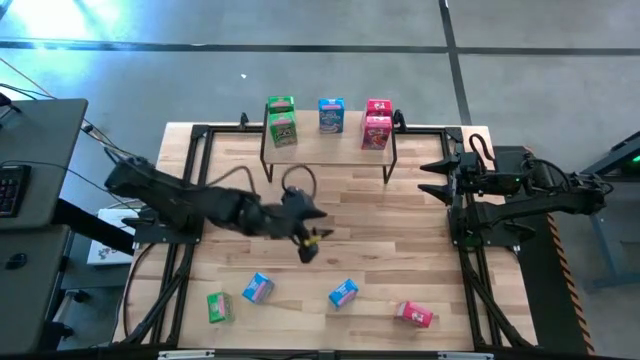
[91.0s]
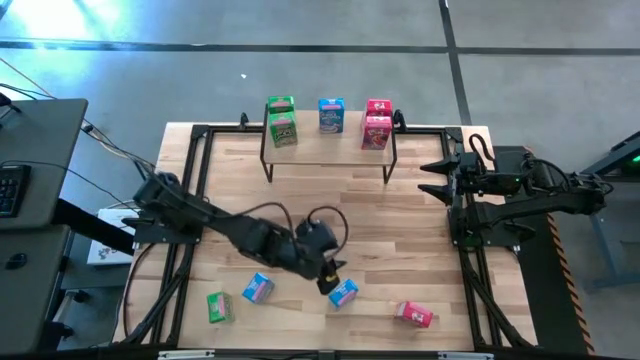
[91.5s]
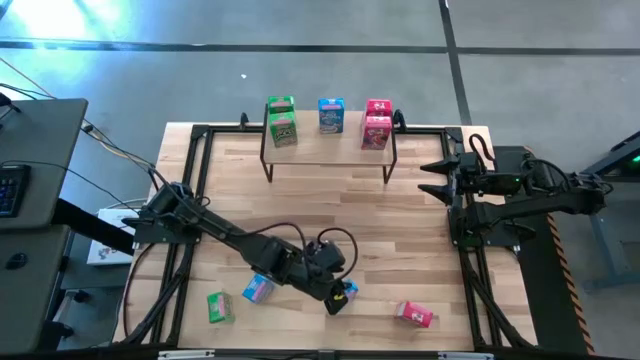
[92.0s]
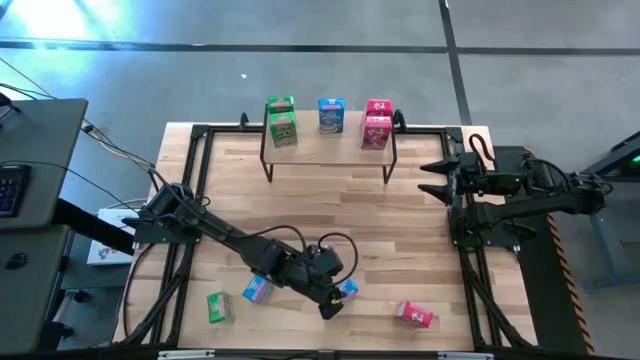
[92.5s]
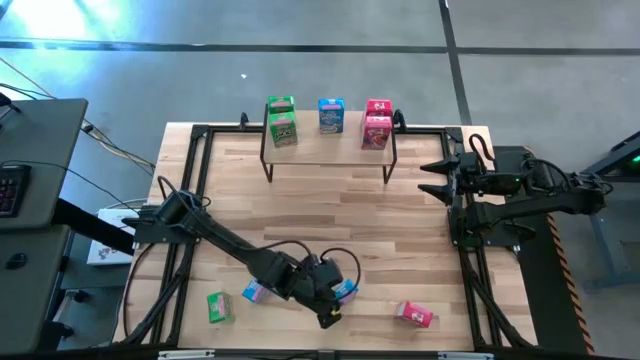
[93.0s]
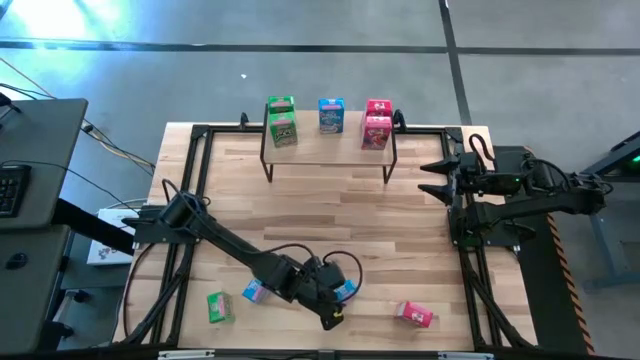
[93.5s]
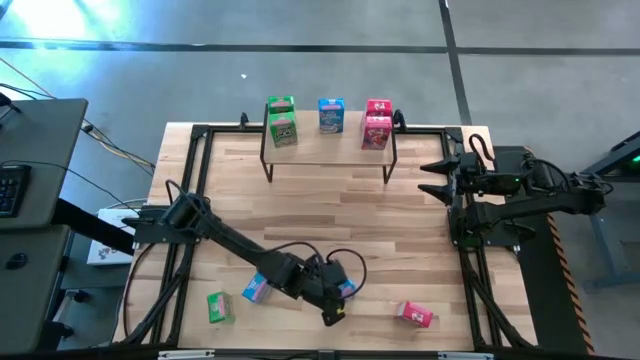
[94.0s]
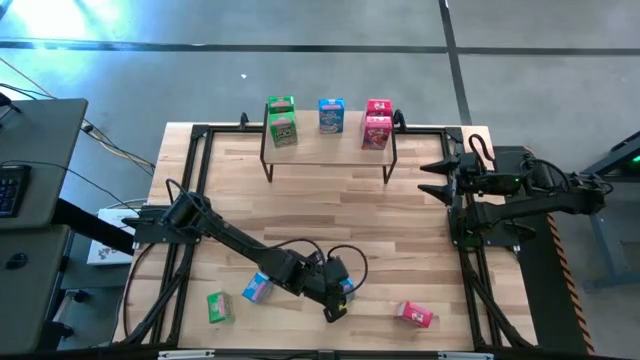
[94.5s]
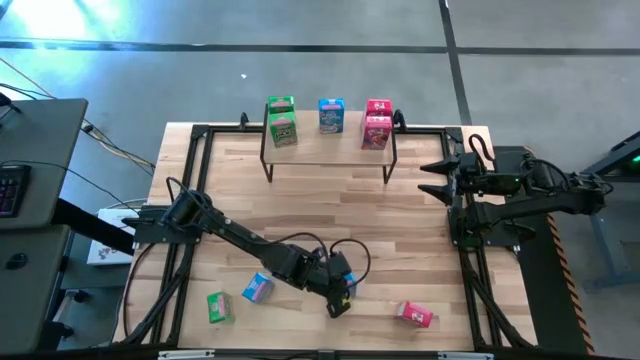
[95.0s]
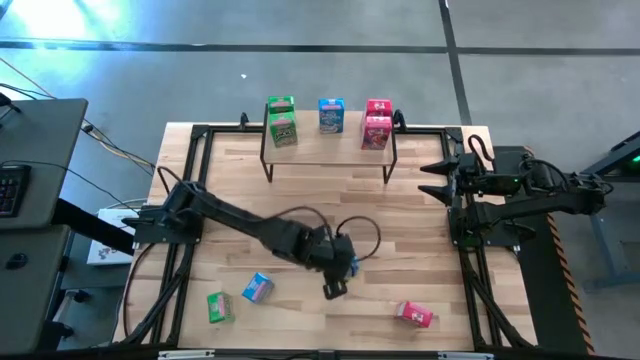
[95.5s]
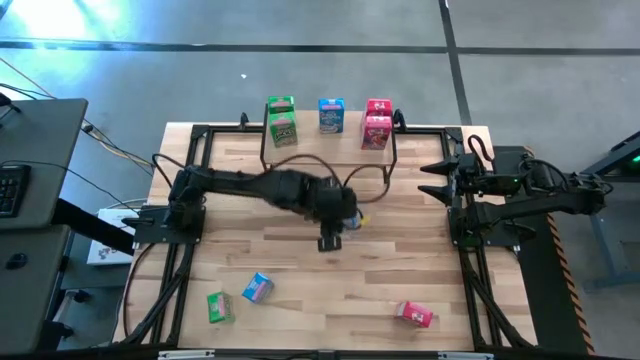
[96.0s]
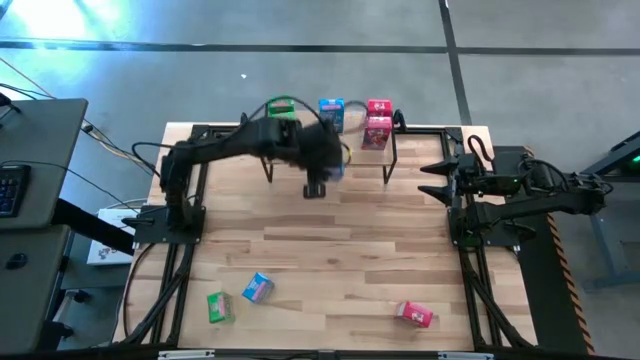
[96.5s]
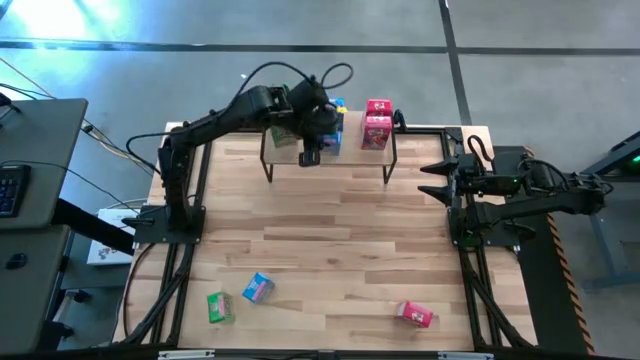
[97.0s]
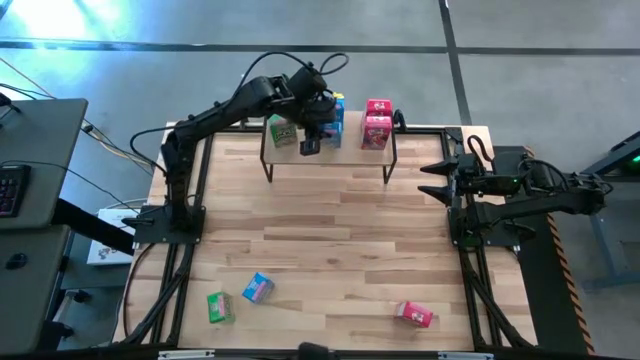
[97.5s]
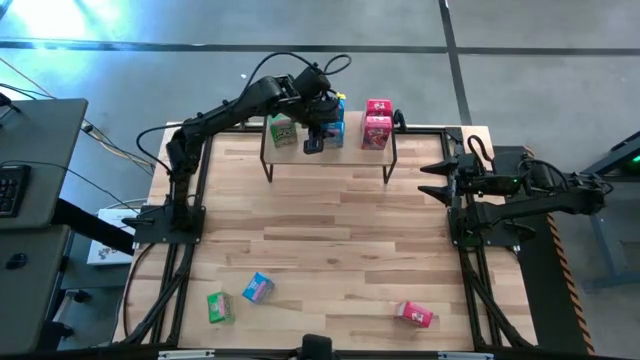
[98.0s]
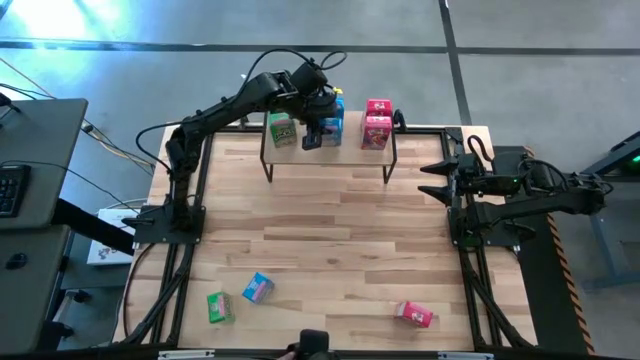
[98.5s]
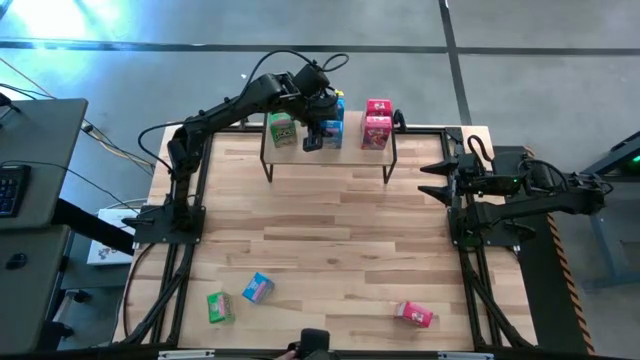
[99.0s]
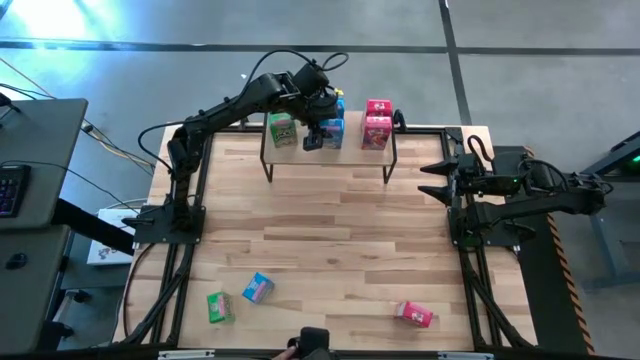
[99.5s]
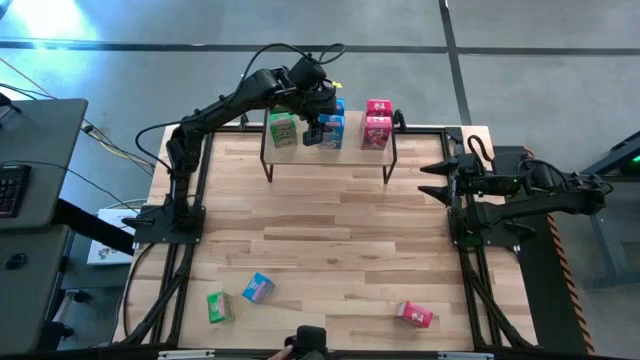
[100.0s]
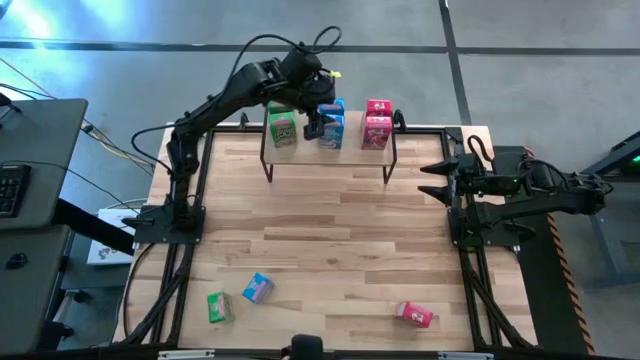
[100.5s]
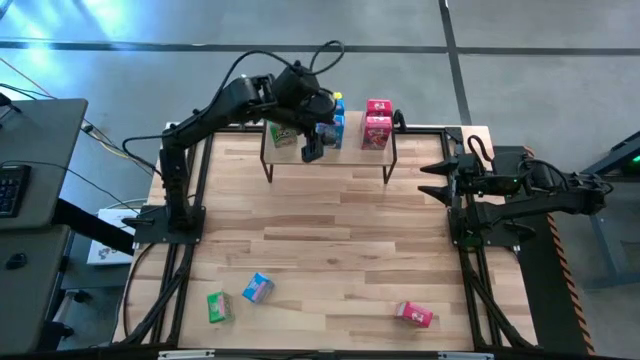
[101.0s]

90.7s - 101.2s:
Task: Stack cereal on shelf
Put the bottom blue cereal box on the shelf

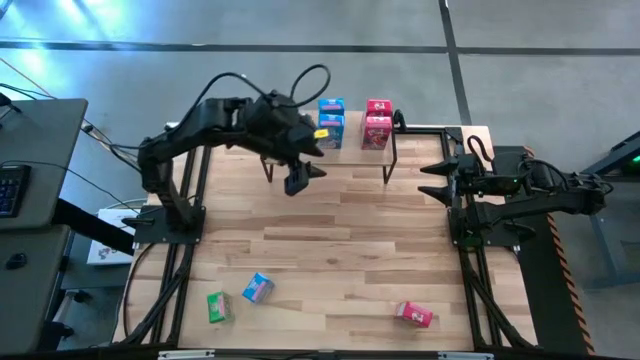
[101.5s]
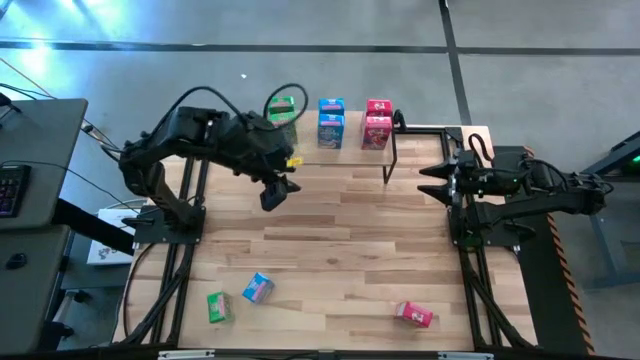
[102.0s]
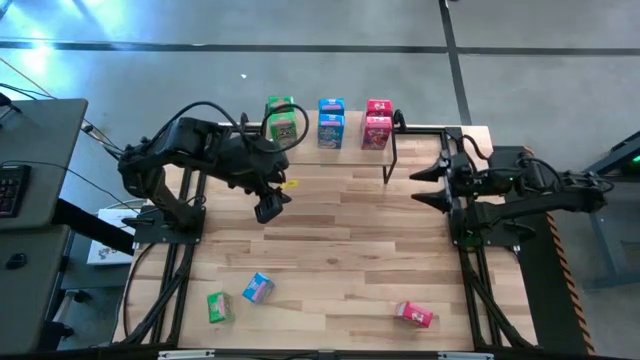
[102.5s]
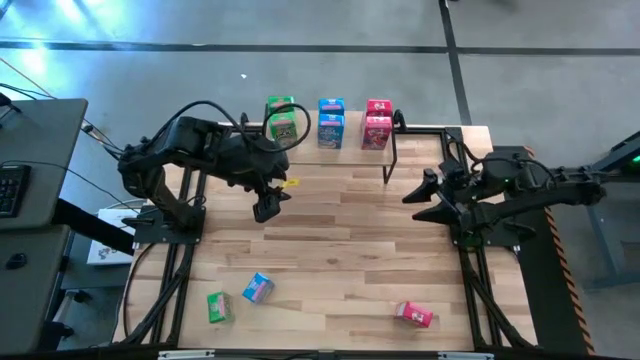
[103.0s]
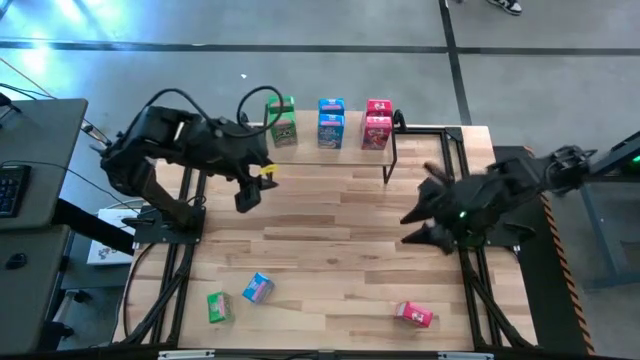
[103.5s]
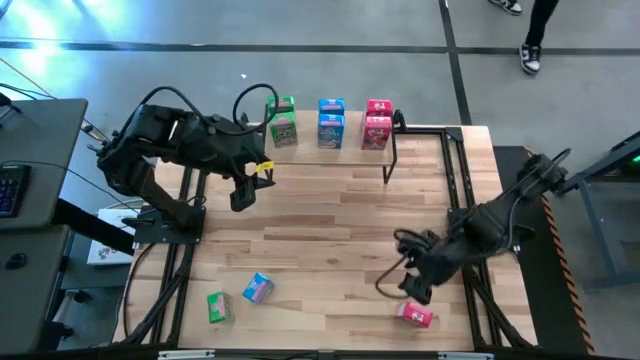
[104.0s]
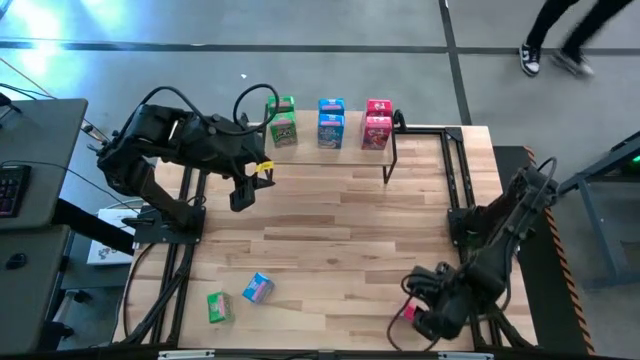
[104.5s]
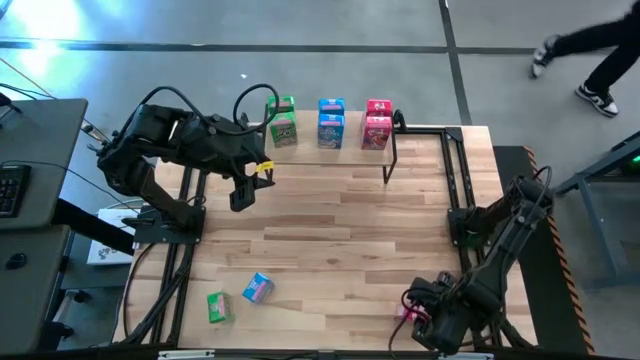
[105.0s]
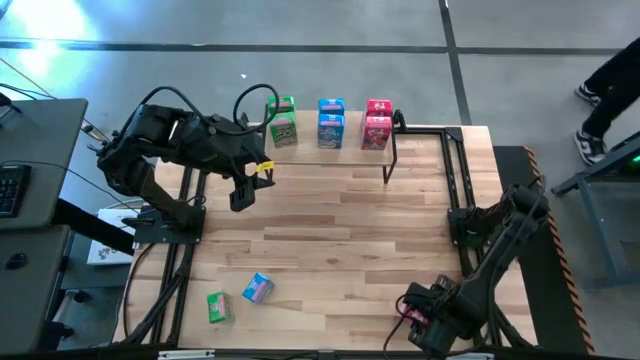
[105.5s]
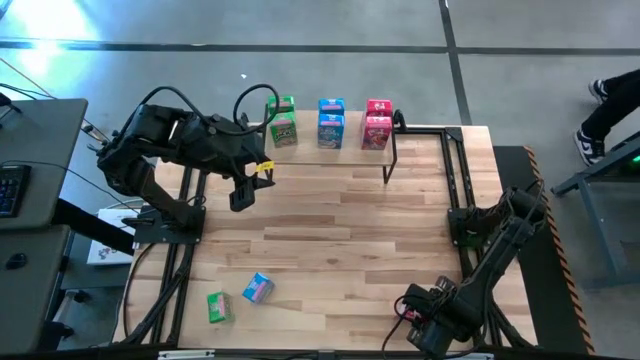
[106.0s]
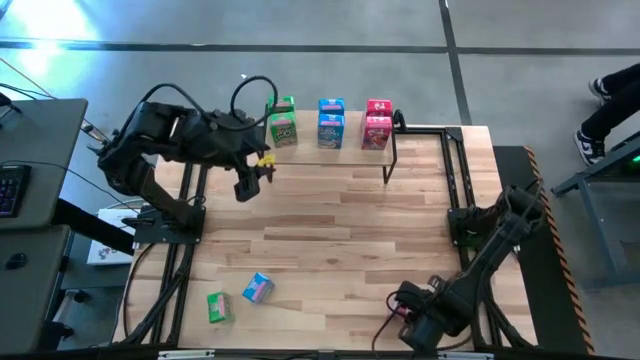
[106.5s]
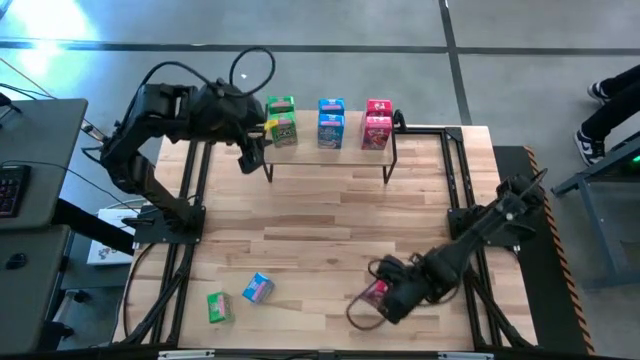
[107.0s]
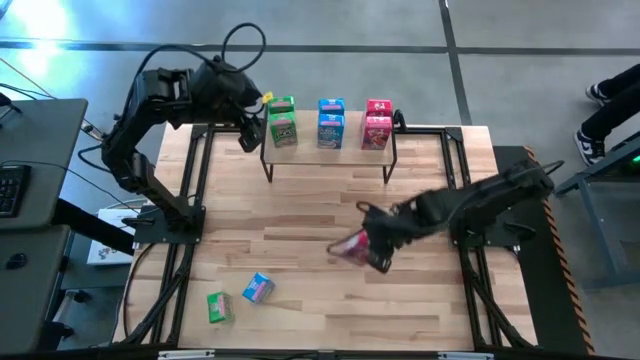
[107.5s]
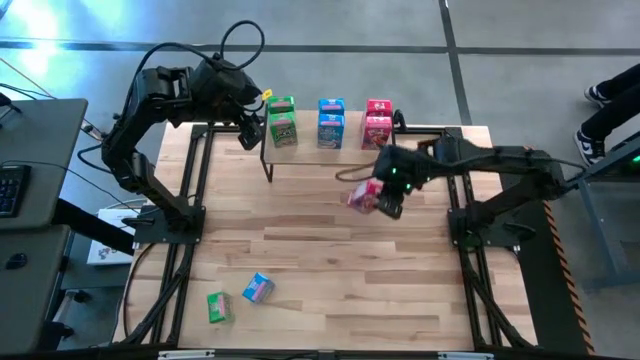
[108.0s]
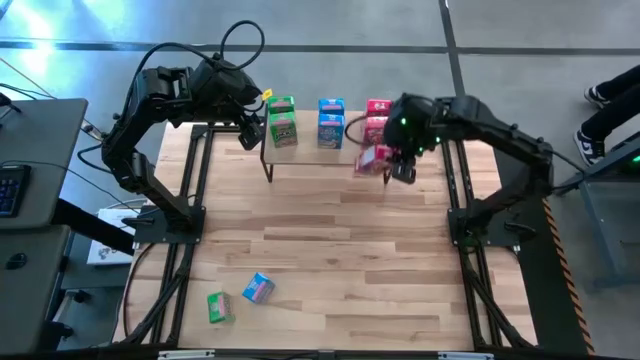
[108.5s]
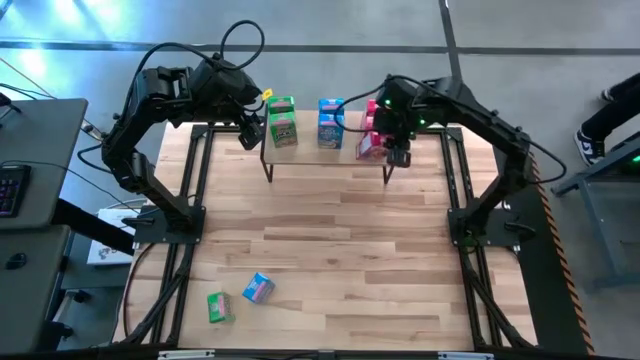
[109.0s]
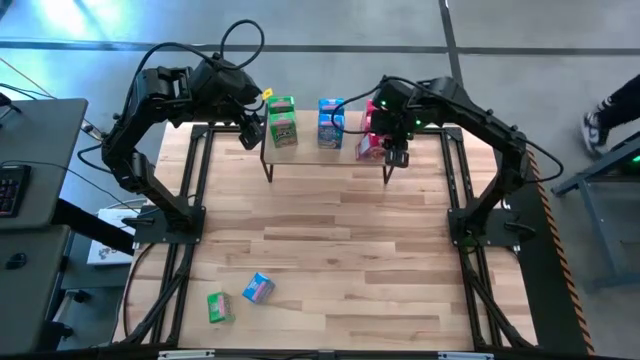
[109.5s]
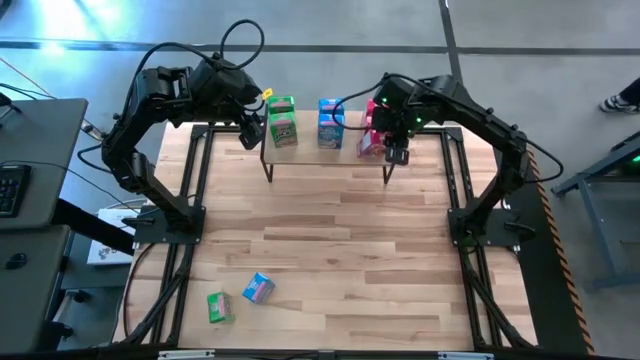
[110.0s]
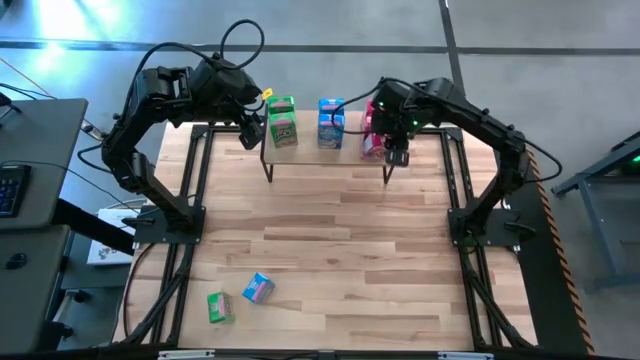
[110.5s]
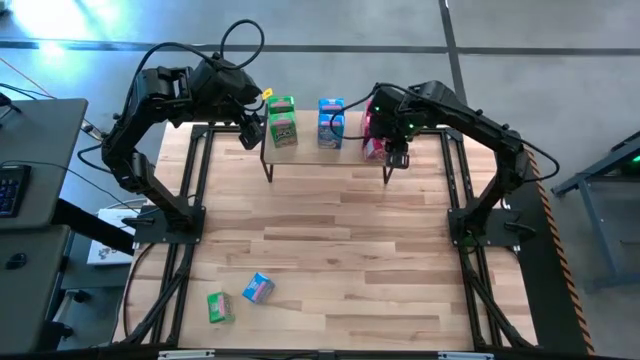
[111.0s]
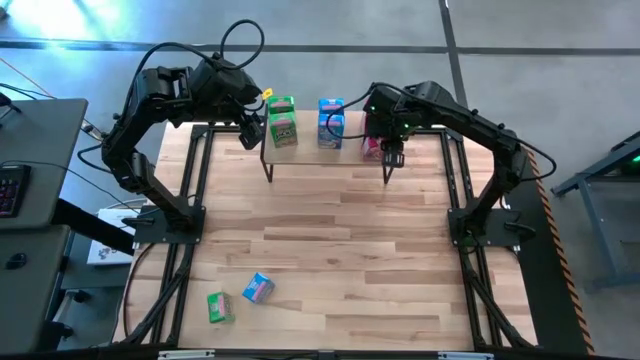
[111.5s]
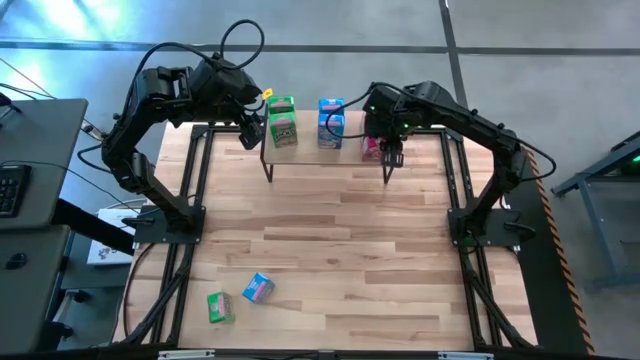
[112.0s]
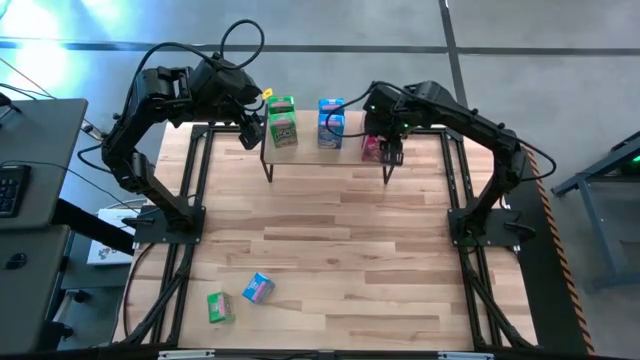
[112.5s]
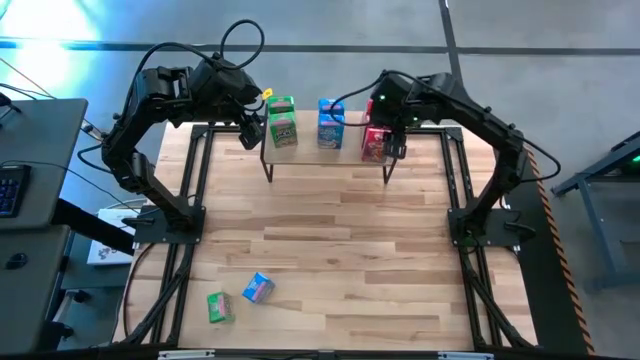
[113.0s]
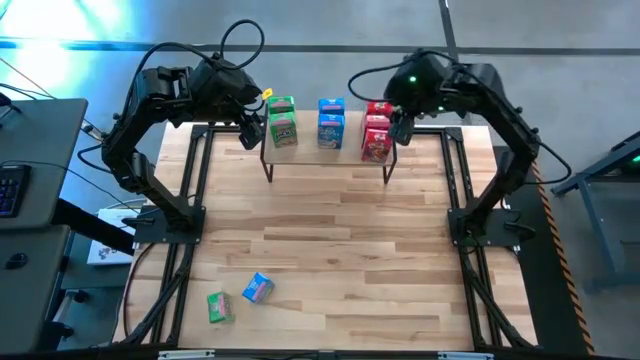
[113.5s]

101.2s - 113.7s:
Put the red cereal box on the shelf
